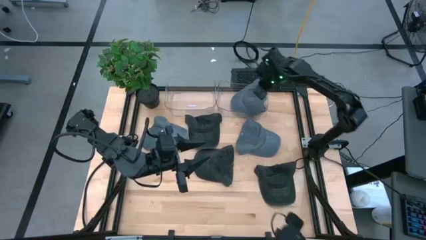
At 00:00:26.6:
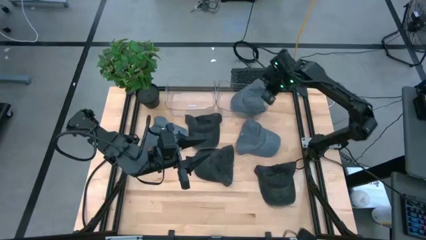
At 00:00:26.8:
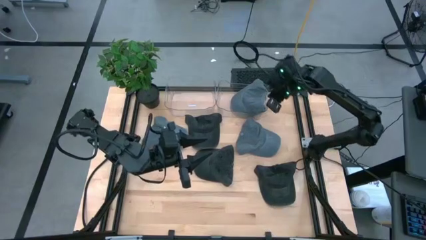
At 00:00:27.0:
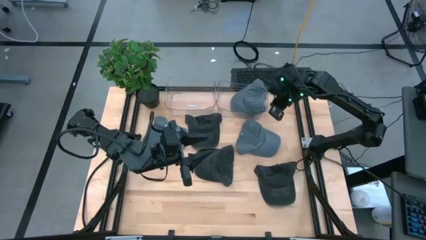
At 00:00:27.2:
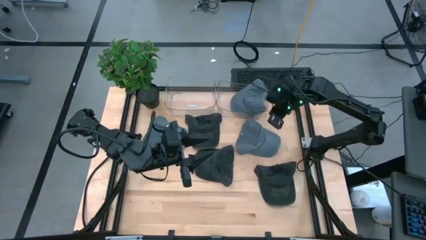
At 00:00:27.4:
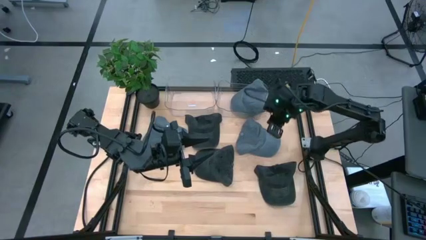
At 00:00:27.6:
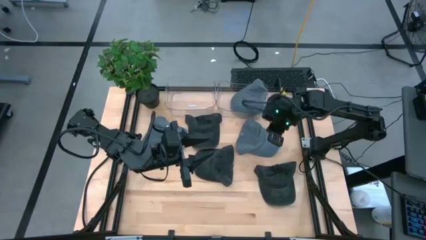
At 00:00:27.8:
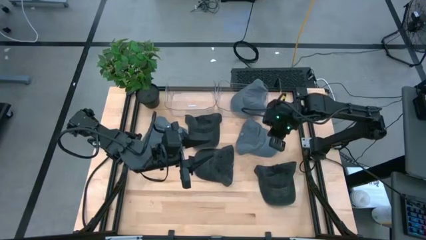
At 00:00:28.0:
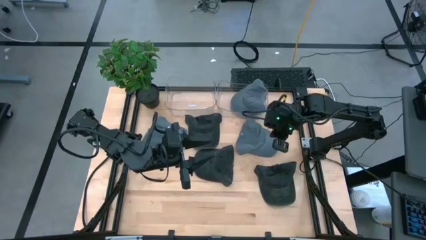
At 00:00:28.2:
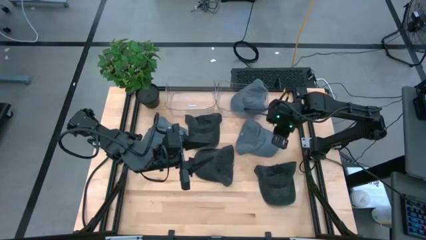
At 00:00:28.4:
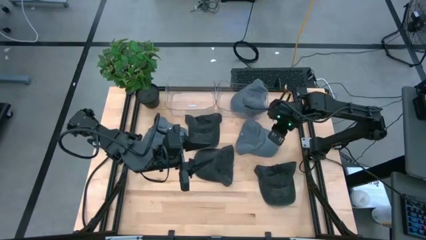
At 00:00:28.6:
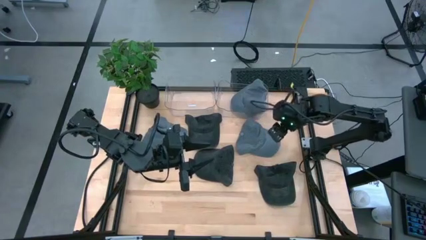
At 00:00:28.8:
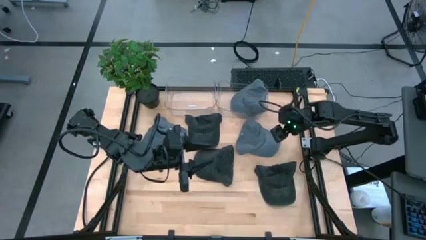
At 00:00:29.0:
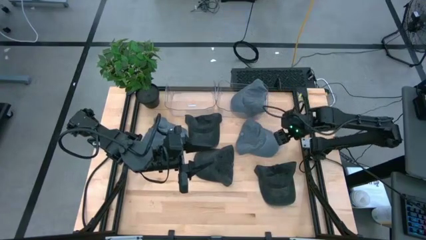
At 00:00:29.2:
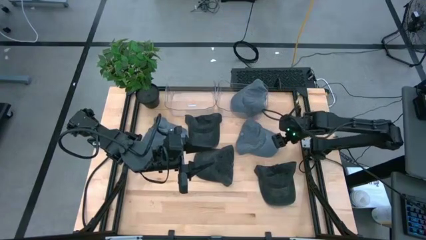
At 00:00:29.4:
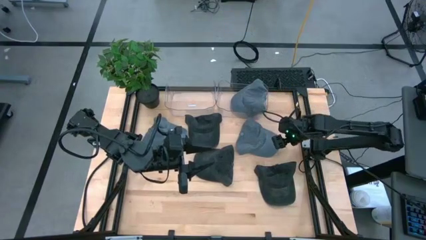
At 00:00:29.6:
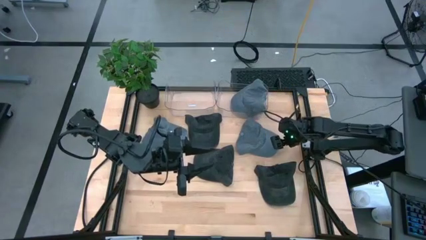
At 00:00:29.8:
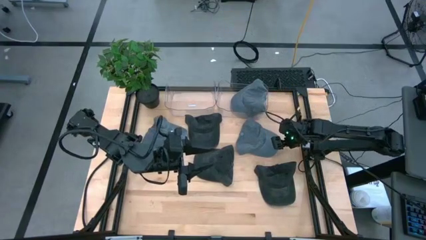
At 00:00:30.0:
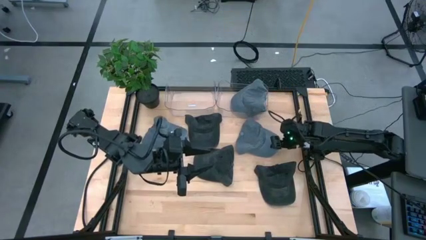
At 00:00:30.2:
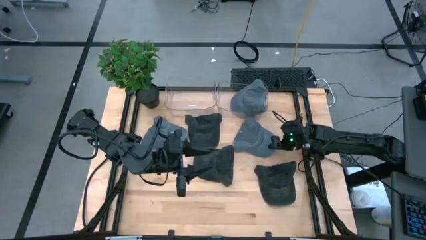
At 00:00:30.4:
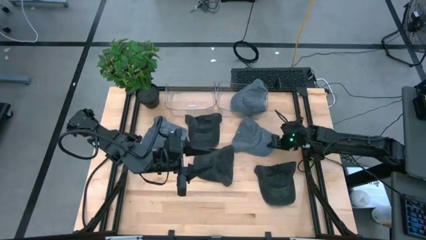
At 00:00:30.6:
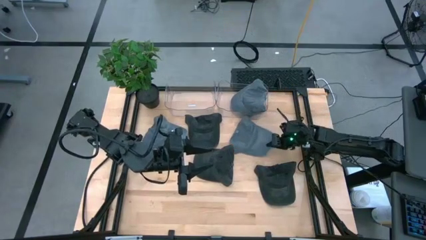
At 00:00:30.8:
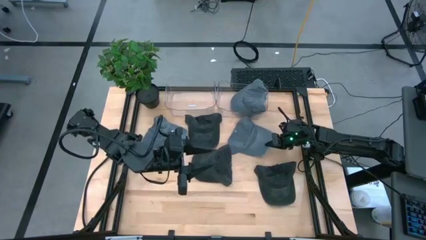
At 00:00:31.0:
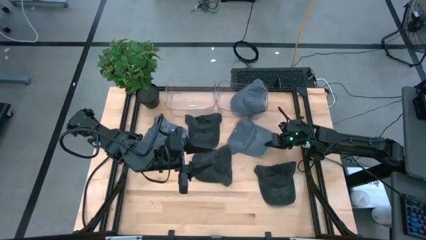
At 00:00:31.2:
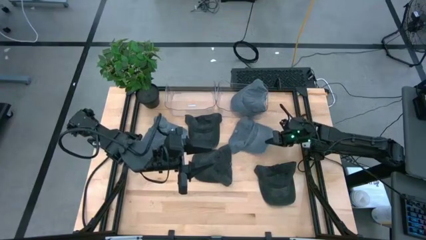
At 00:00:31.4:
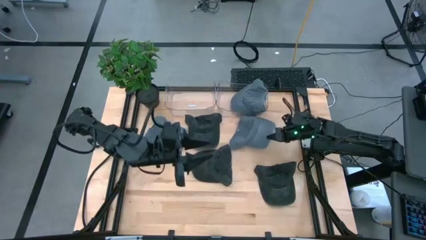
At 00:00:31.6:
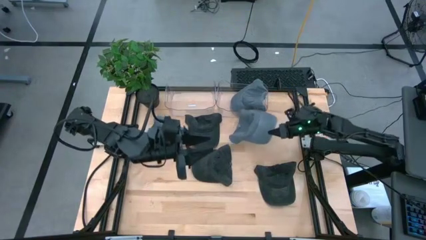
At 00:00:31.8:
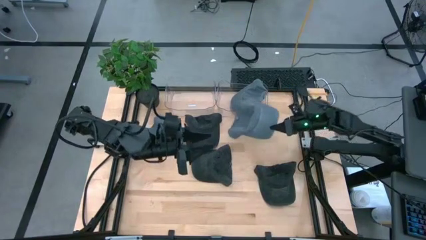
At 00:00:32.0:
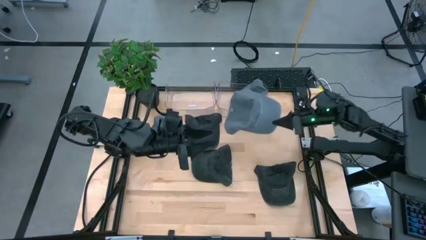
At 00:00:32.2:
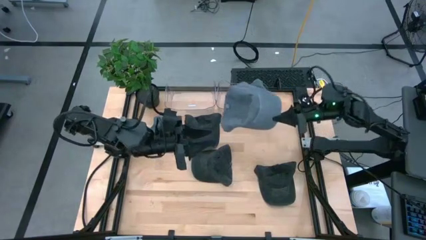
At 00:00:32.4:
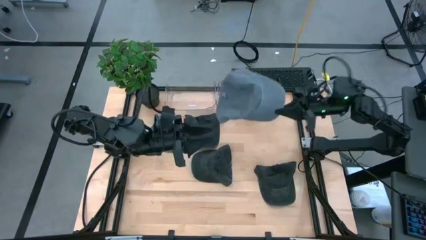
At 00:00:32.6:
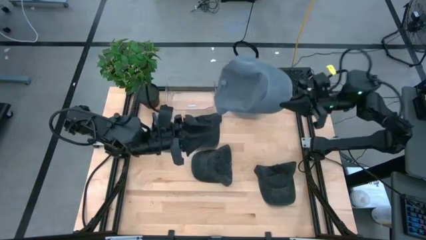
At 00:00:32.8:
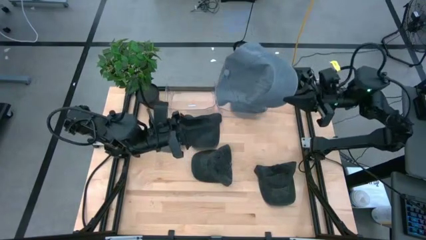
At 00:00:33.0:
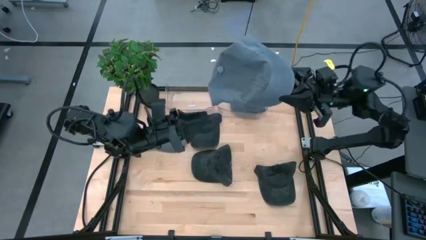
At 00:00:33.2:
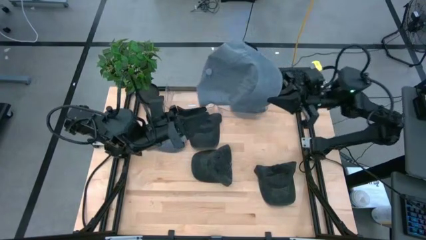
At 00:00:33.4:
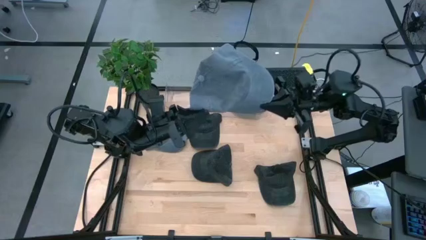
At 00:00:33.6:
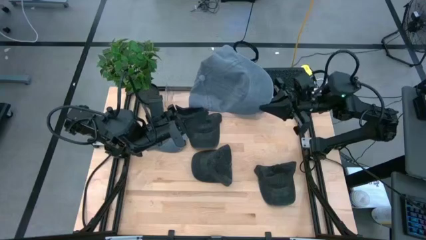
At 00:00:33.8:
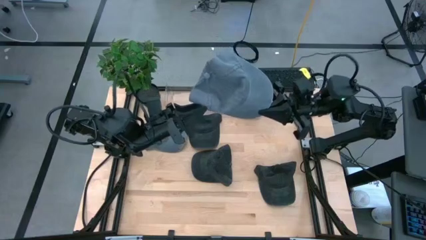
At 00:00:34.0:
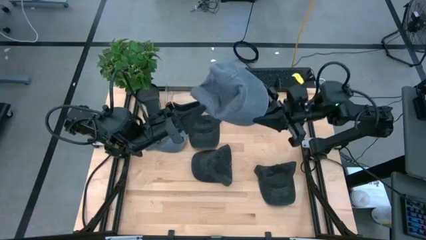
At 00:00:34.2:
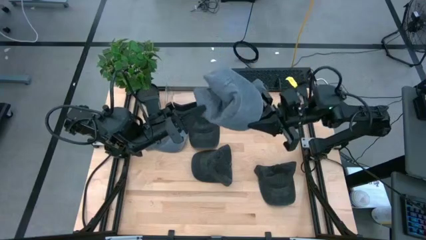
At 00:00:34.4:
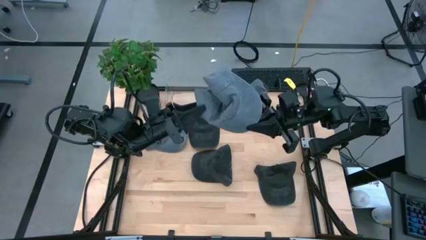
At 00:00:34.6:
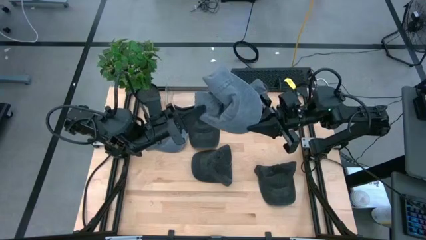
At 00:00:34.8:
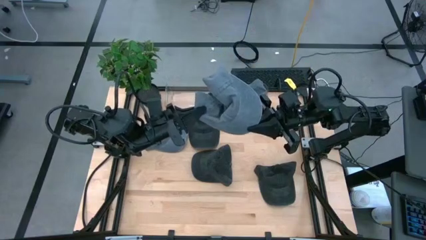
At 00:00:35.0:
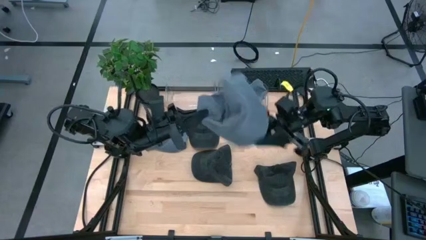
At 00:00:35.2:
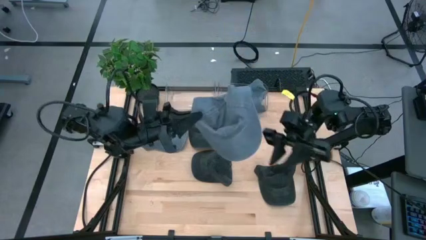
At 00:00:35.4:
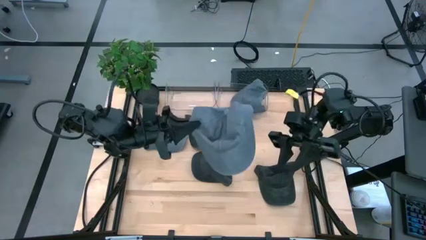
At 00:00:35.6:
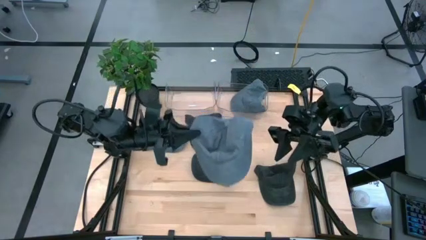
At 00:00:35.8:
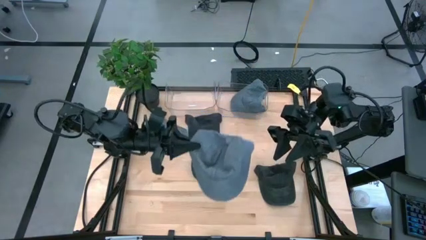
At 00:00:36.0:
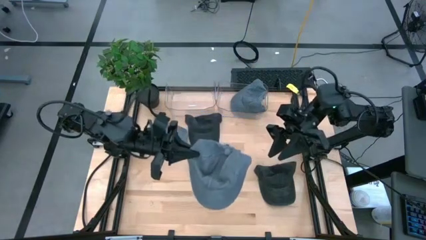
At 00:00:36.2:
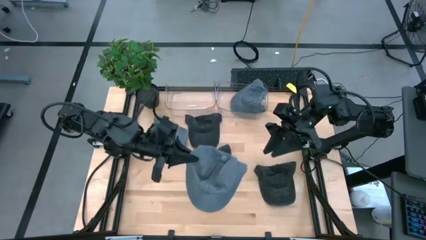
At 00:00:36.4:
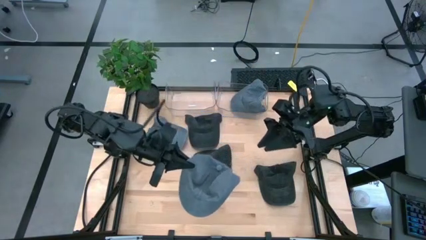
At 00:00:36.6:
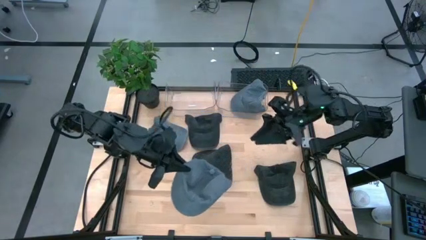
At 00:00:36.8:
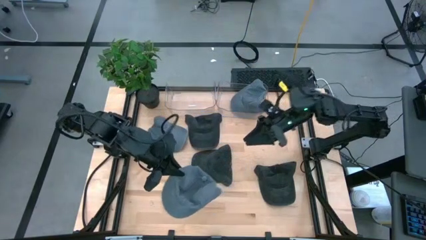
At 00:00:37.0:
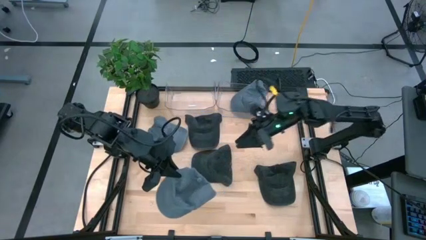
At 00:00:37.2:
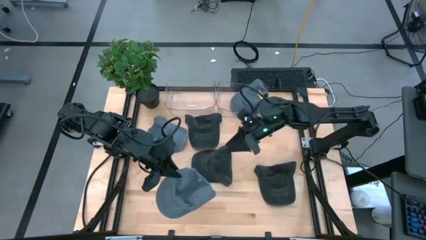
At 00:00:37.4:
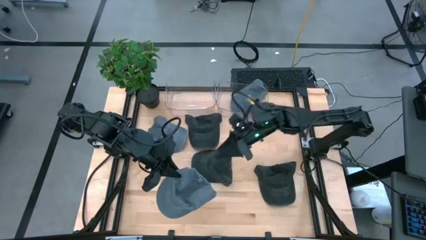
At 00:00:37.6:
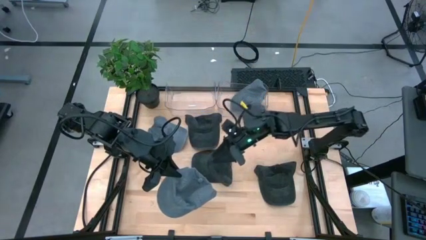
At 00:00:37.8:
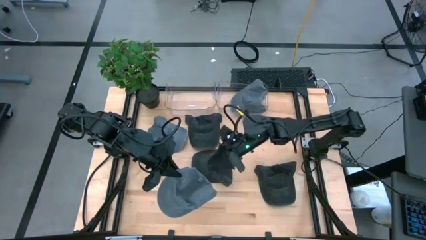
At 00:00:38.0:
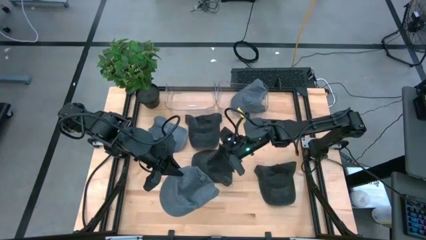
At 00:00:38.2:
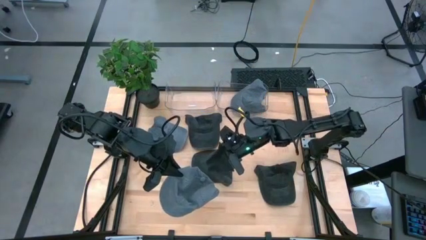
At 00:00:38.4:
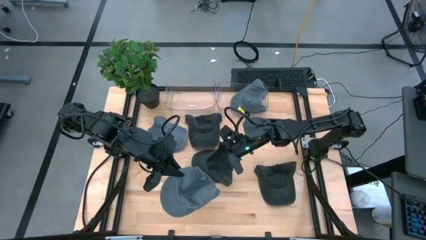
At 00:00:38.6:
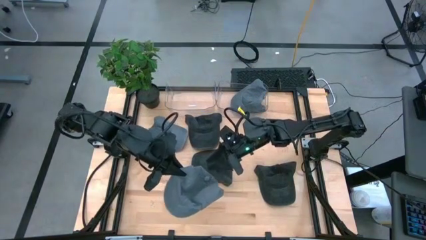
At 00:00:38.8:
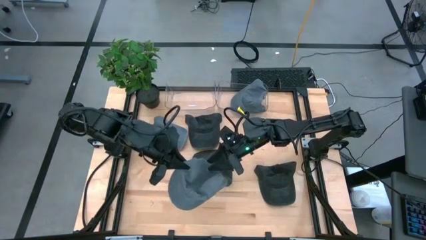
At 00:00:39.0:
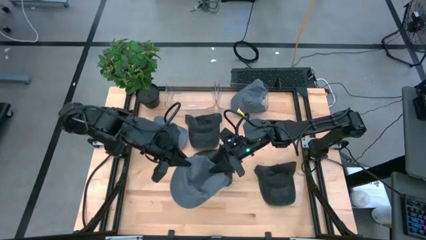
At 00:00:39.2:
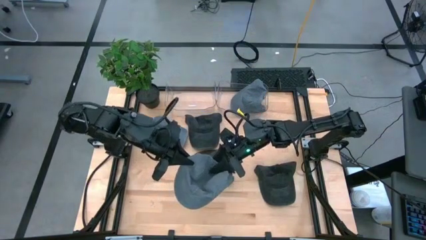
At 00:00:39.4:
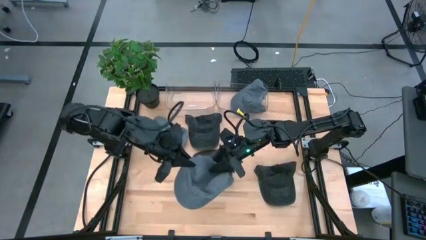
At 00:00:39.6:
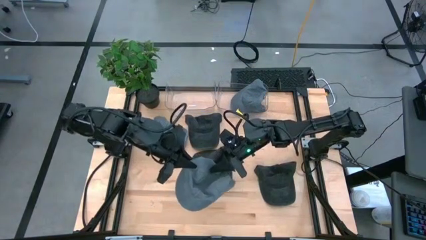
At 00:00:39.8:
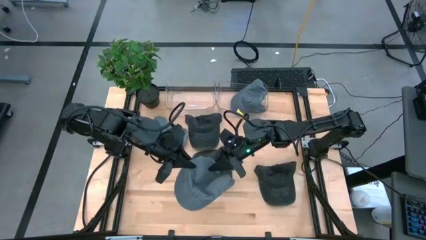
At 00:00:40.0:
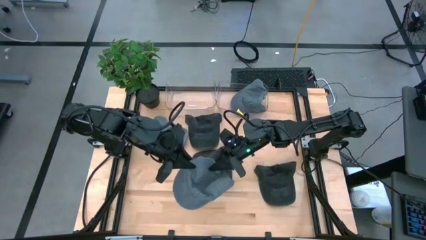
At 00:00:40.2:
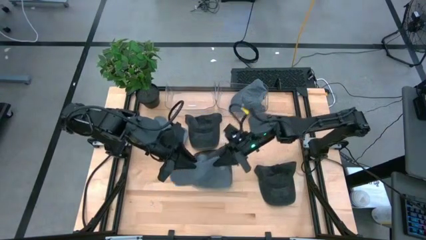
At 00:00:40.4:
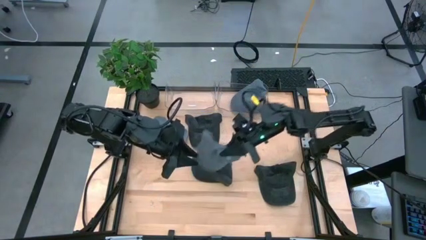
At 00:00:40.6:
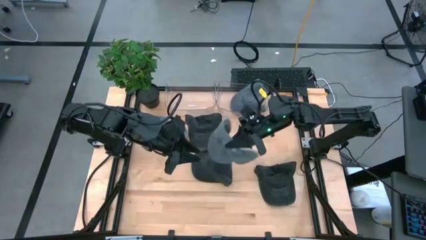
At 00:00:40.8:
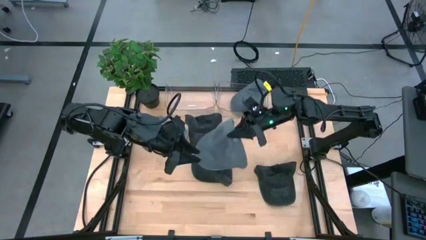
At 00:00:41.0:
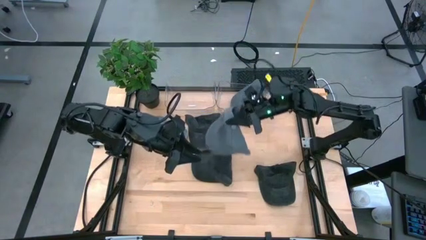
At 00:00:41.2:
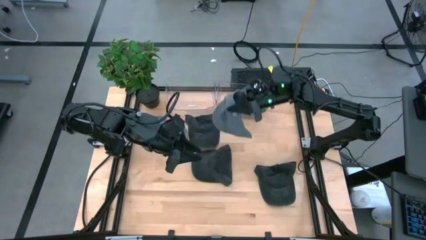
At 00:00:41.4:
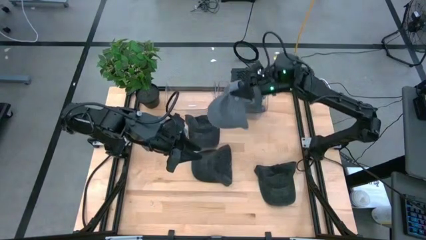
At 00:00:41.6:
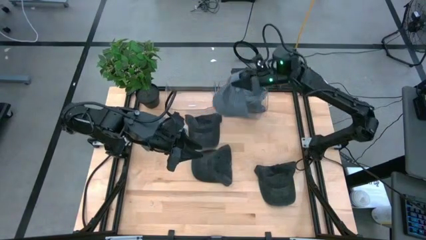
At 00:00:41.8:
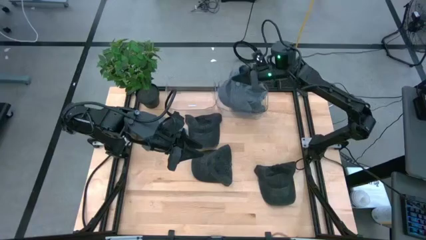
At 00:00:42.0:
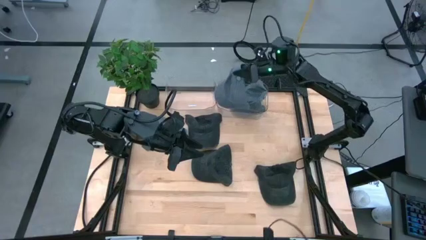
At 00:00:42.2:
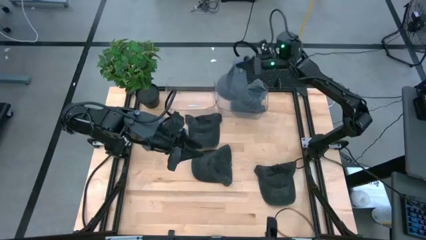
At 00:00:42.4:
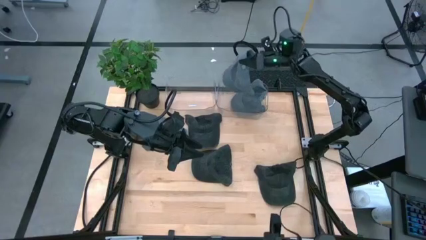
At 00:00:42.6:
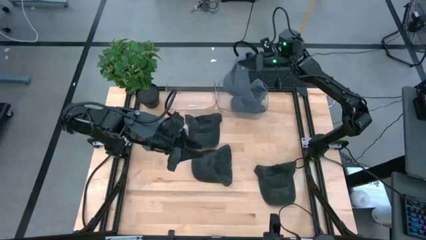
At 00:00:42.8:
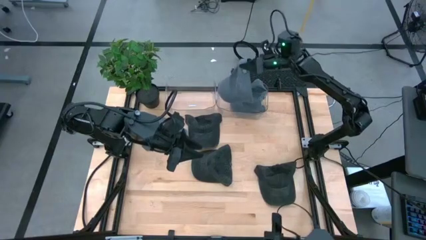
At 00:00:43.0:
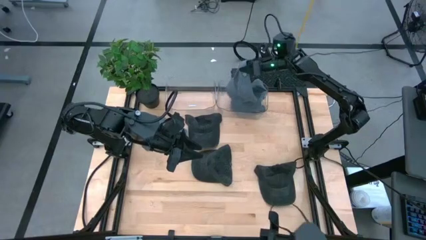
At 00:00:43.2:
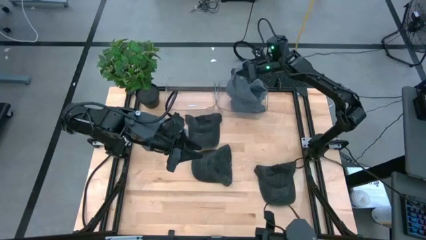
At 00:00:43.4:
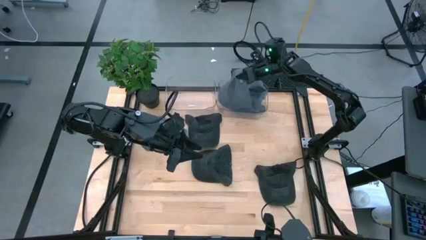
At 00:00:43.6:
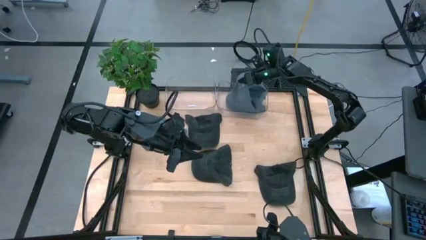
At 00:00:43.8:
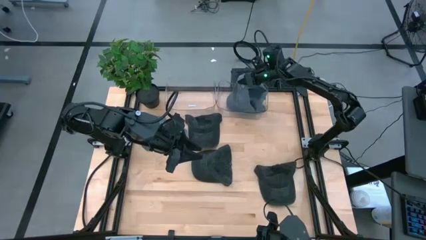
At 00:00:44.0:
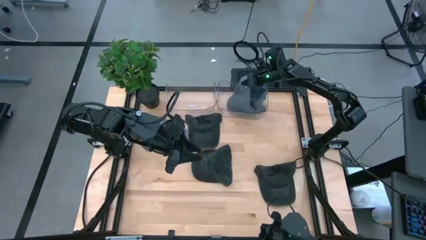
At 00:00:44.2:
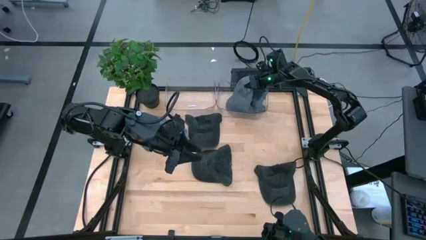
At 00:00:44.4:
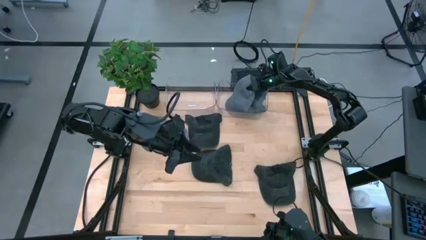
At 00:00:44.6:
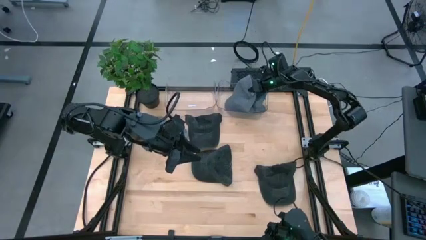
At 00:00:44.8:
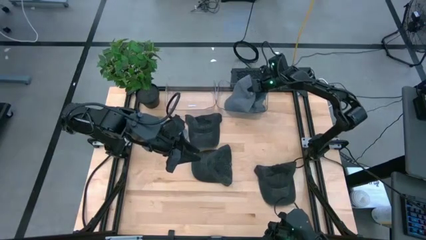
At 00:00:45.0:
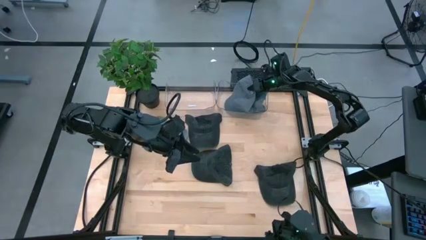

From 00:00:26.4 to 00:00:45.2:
Task: Pick & Place hat
Put the right blue cap into the right transparent bin
